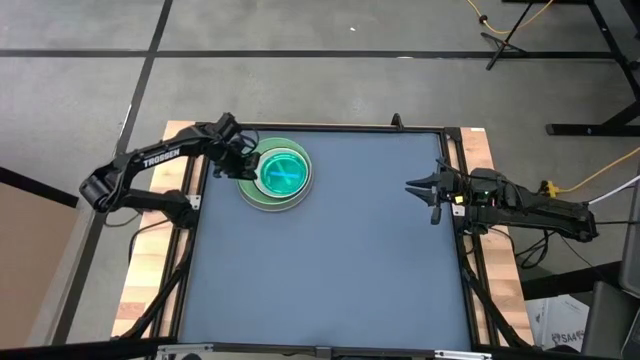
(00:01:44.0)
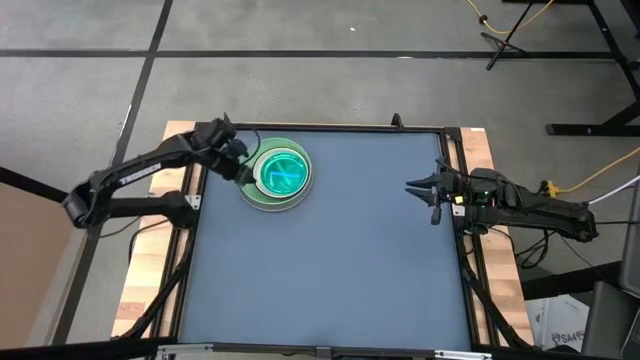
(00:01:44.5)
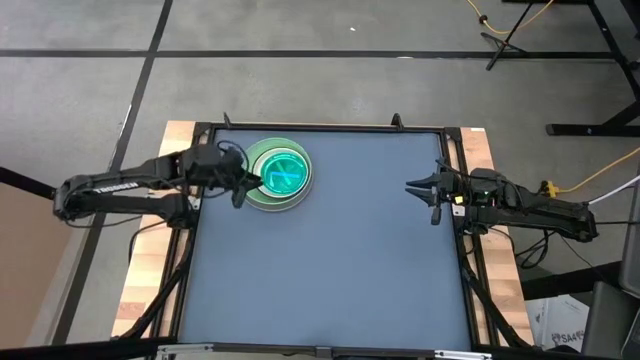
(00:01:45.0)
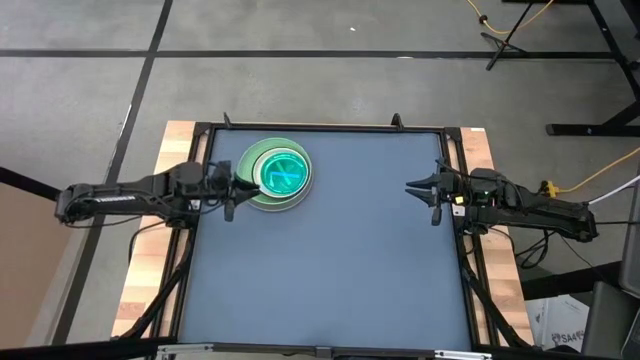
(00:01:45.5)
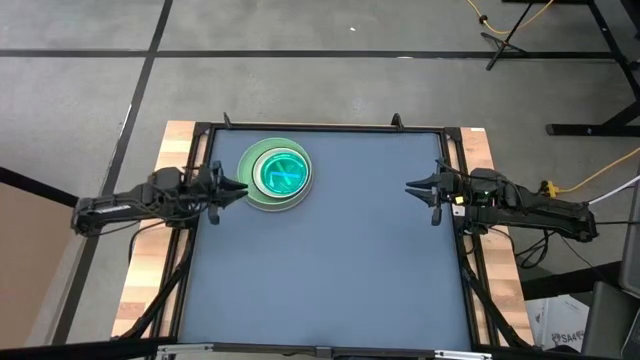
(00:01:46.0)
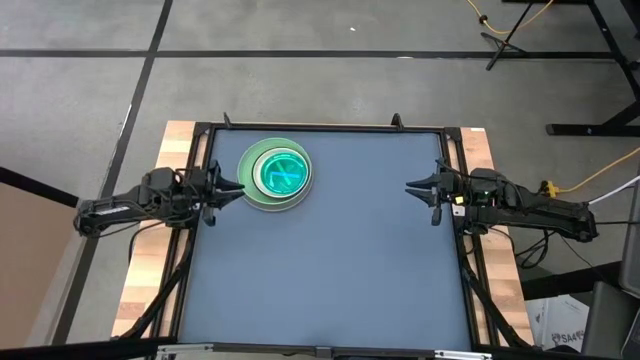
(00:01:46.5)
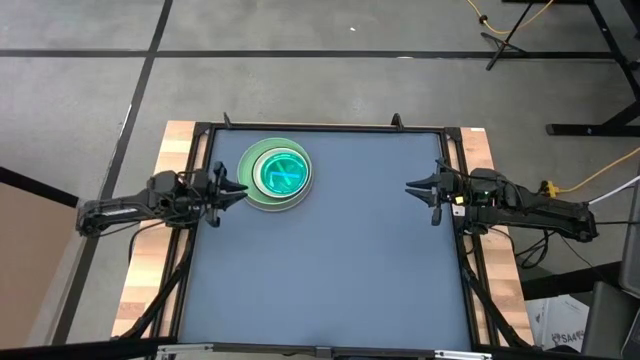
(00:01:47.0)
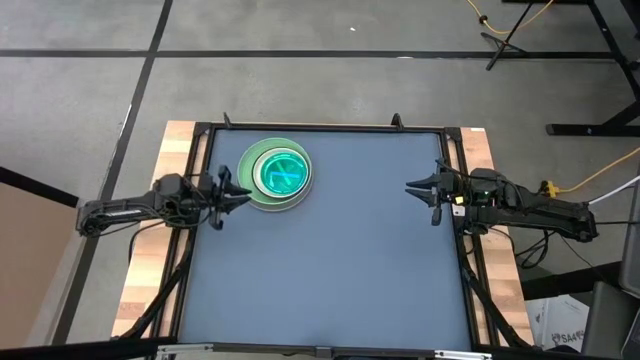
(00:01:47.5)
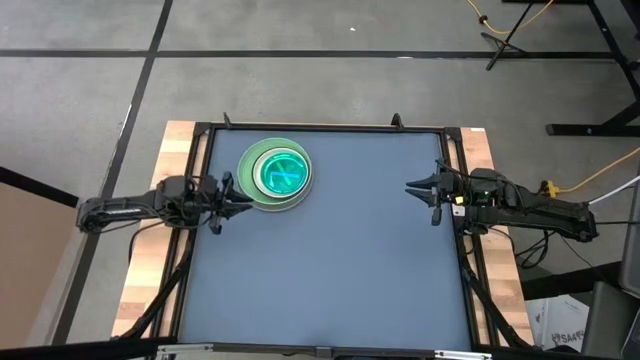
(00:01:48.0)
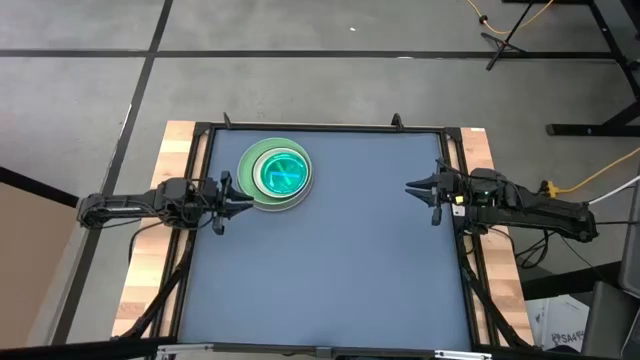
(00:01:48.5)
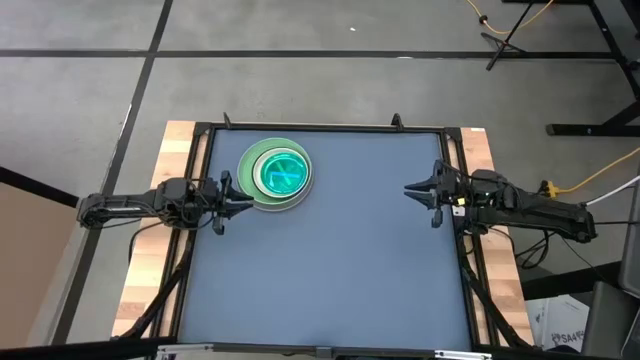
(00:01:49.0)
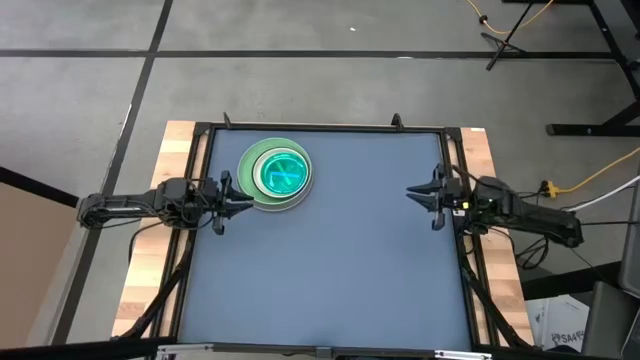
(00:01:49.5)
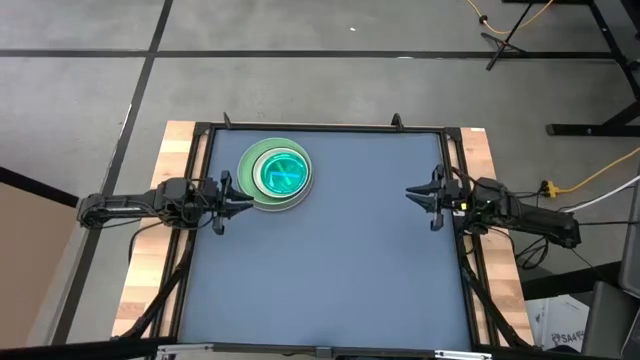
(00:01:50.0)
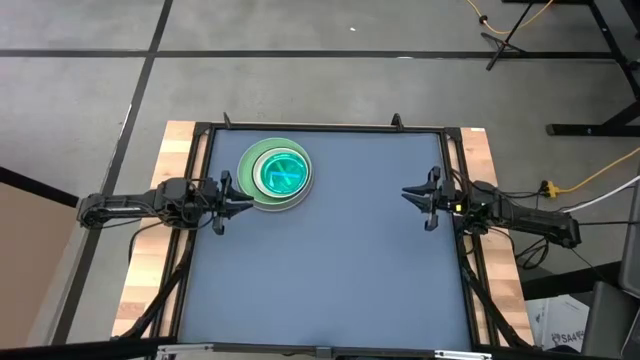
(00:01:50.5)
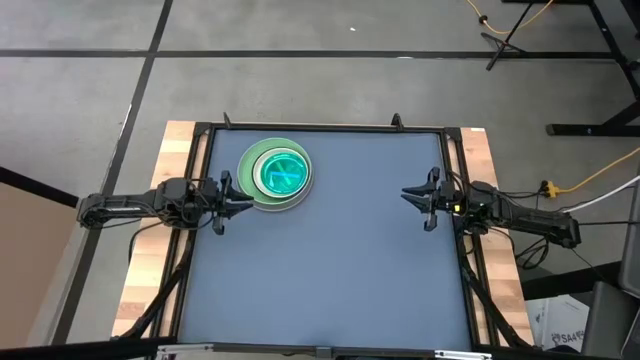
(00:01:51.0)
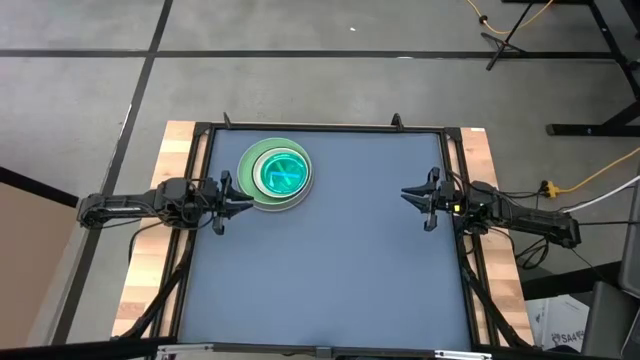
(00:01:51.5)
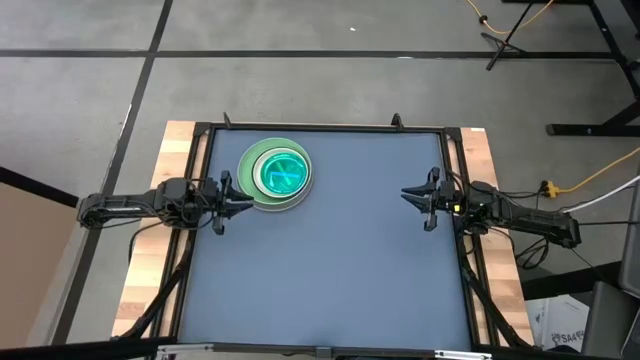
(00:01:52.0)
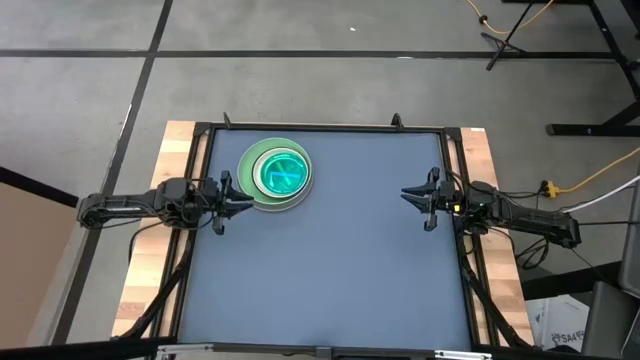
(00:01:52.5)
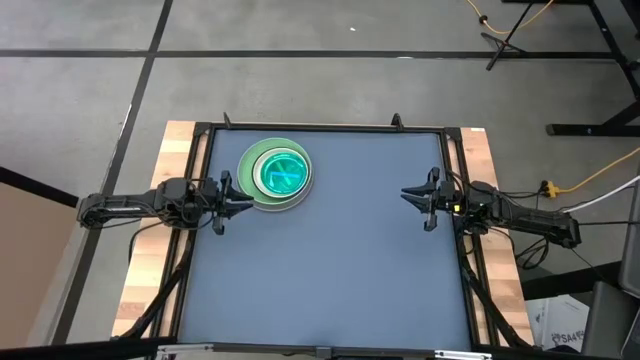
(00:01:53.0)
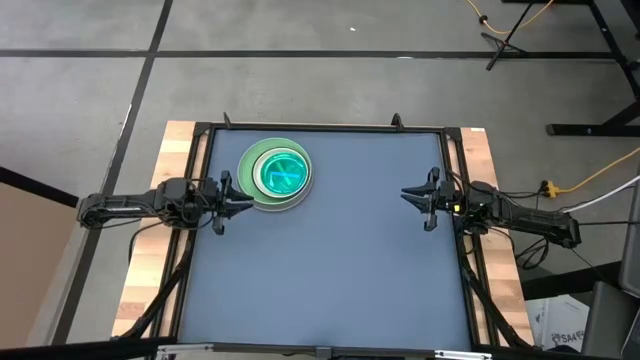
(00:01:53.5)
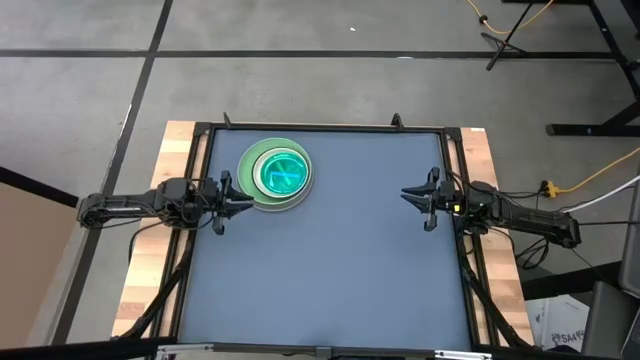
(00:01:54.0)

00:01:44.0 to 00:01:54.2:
Task: Stack plastic plates
Return to Home Position

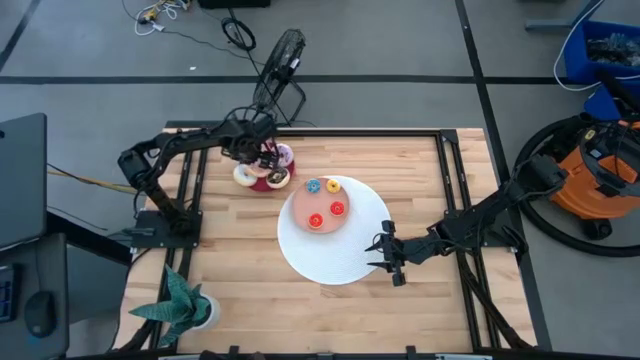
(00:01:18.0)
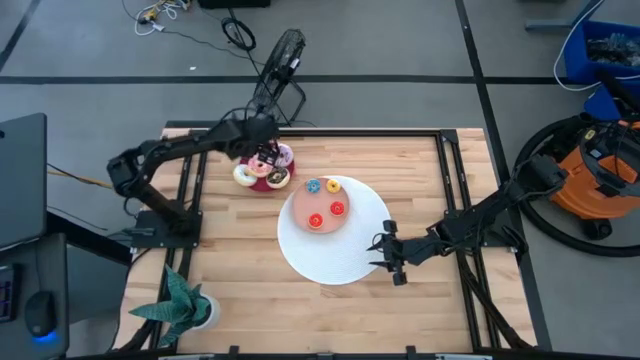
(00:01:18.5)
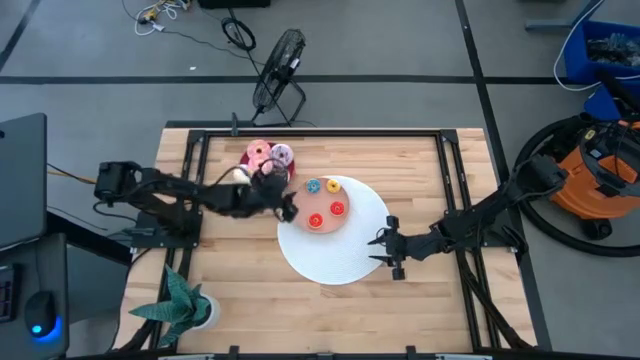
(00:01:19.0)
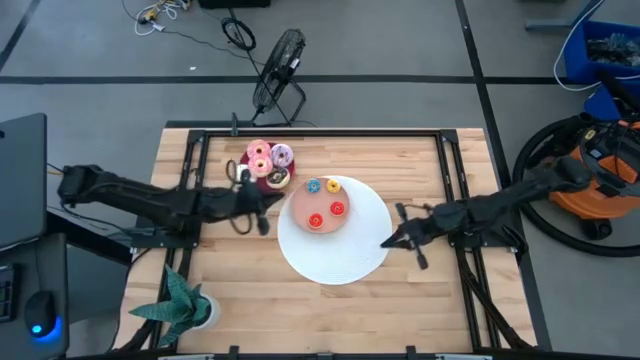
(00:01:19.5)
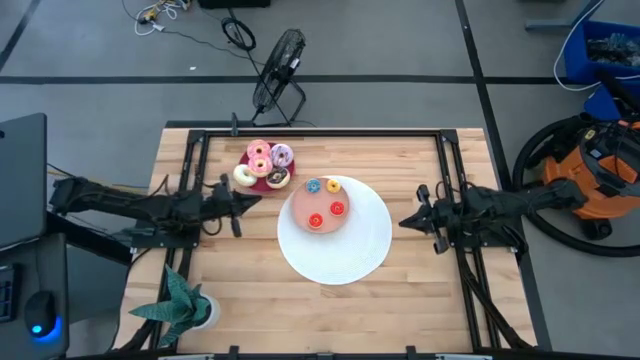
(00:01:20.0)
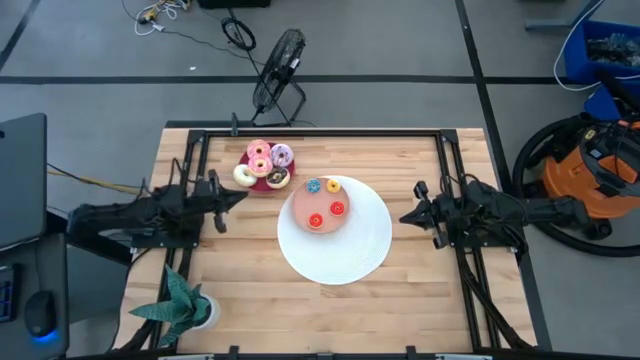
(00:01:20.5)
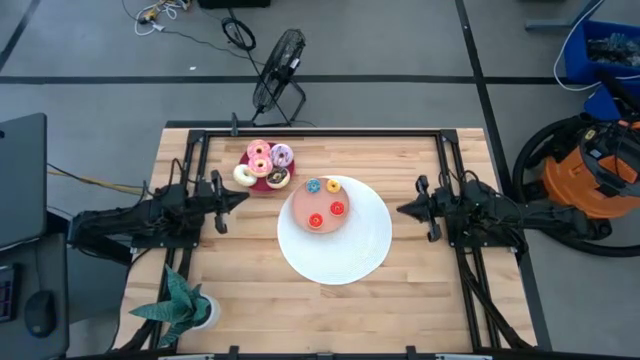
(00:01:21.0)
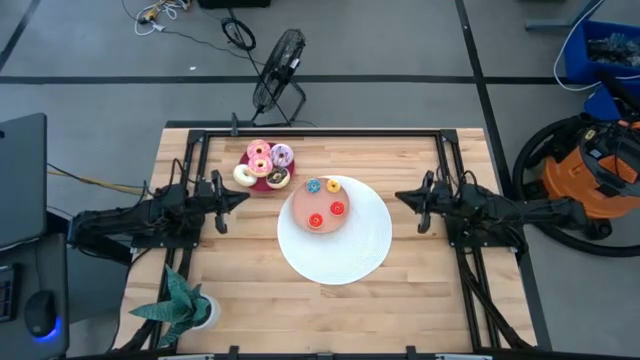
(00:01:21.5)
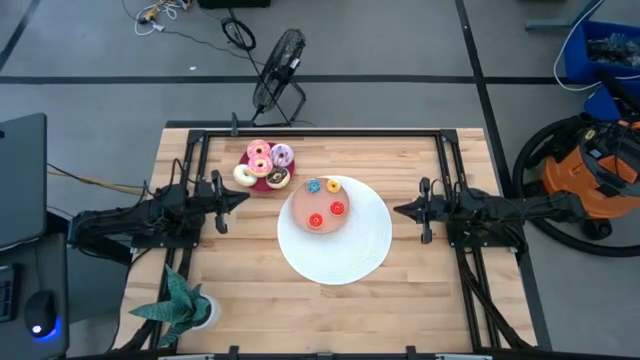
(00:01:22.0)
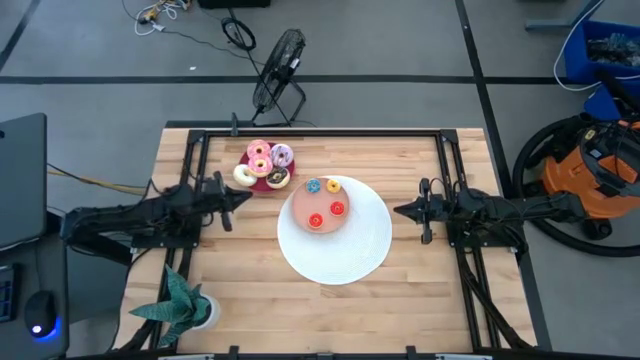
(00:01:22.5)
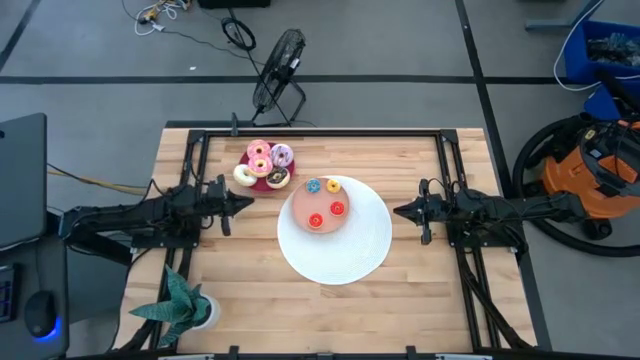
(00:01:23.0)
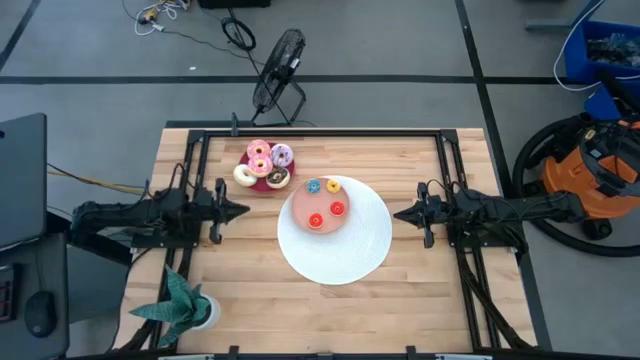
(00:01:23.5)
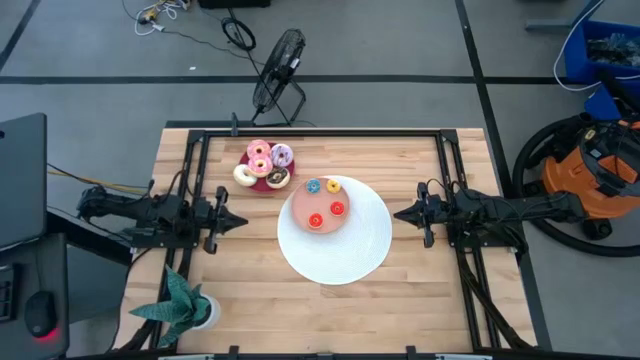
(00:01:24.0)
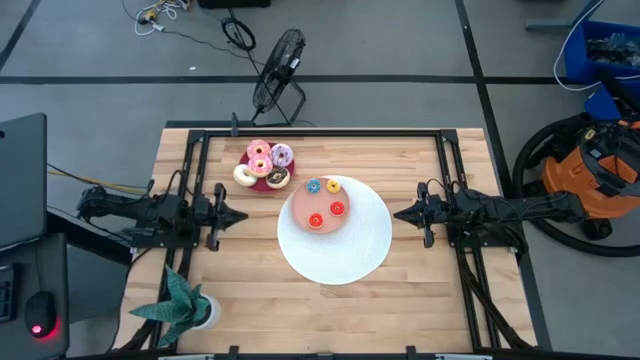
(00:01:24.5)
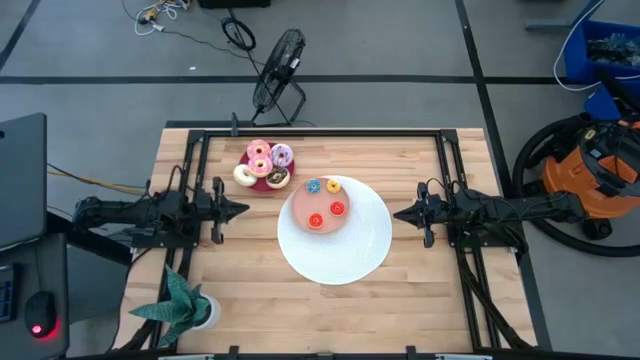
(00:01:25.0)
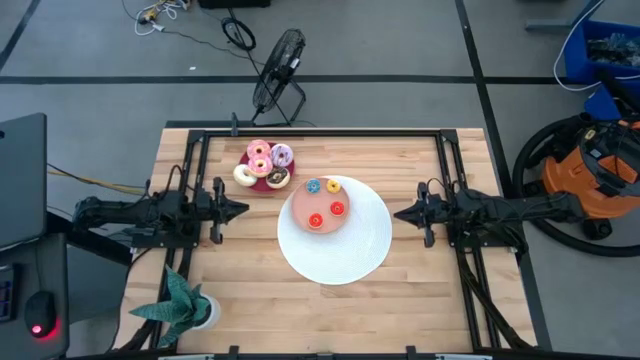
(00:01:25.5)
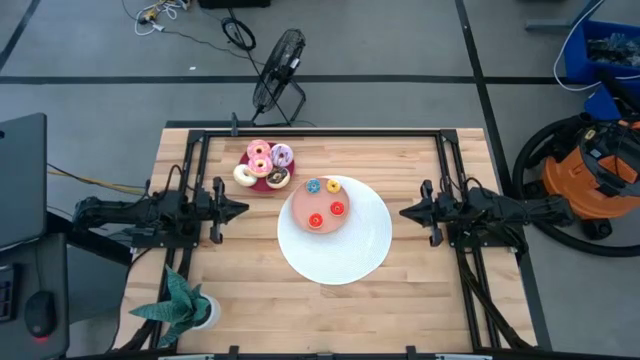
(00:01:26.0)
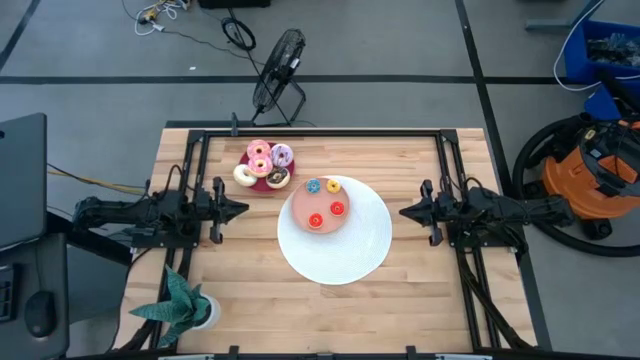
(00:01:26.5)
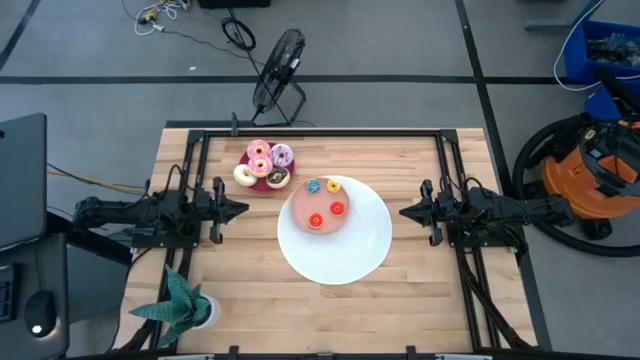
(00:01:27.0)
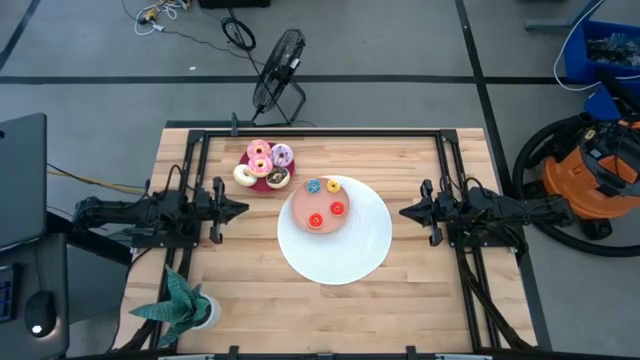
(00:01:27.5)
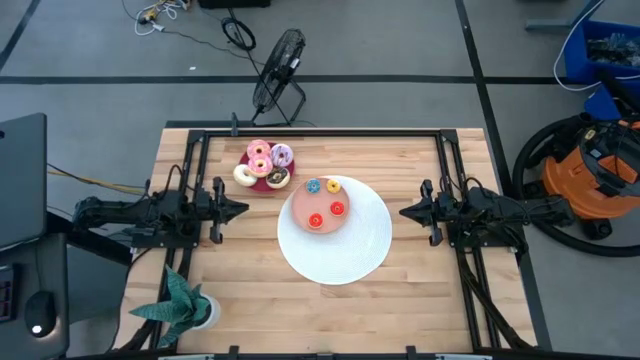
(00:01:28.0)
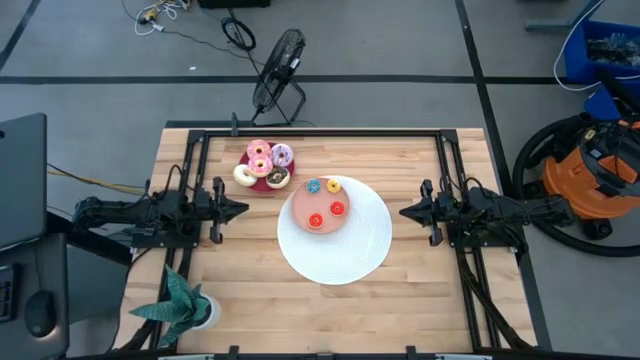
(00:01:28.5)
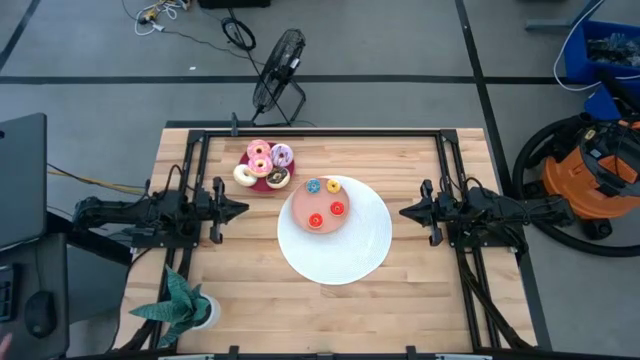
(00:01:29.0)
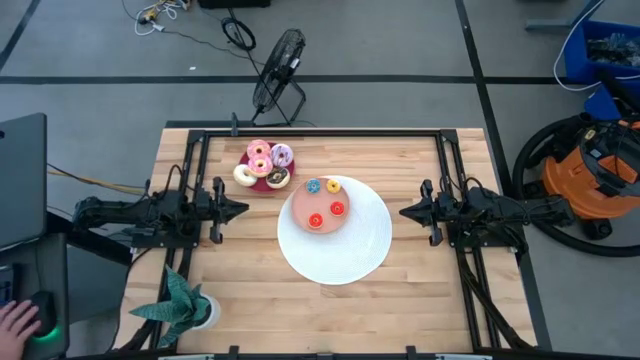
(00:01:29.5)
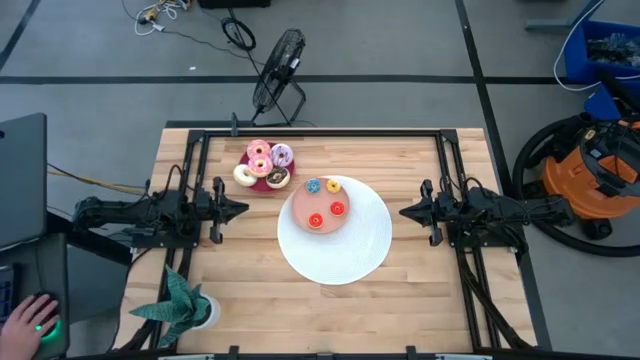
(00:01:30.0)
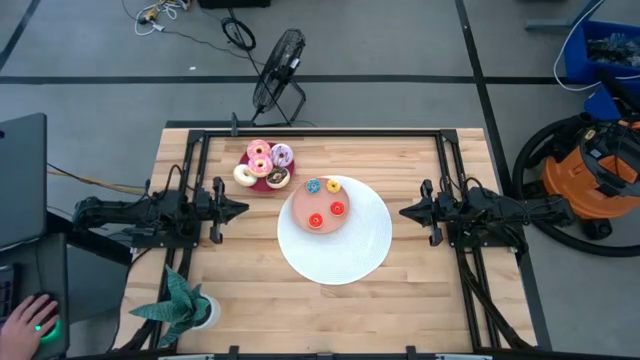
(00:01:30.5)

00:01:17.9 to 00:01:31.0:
Task: Pick & Place donuts
Return to Home Position
